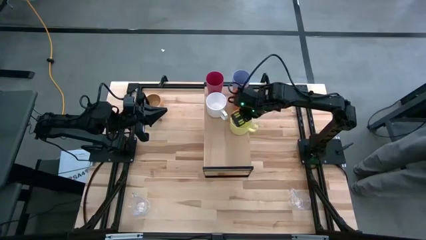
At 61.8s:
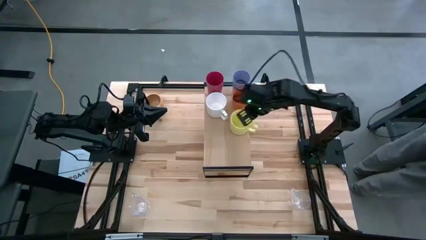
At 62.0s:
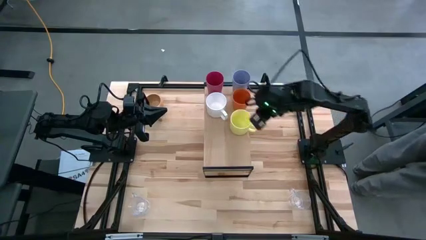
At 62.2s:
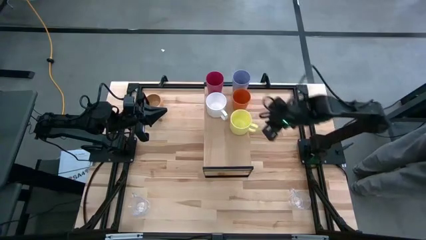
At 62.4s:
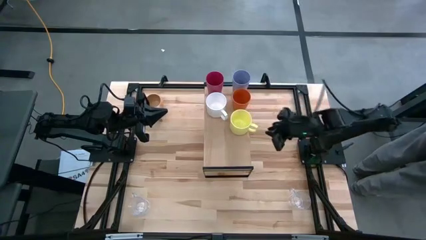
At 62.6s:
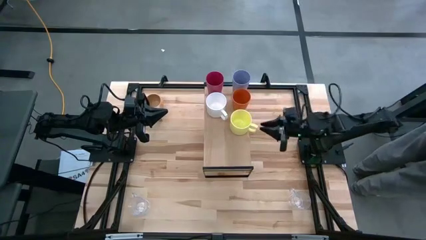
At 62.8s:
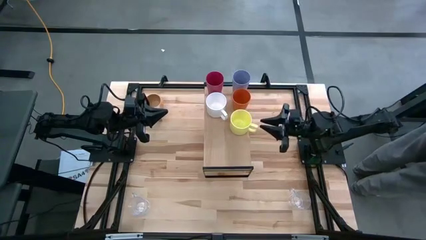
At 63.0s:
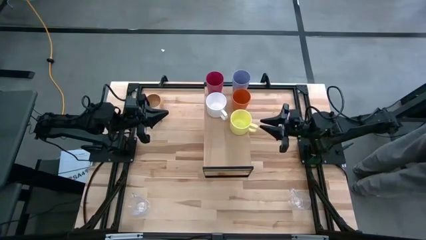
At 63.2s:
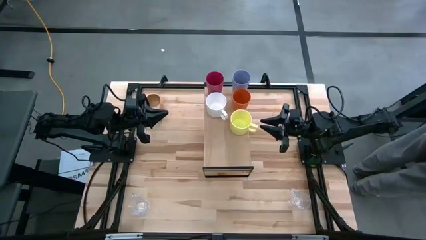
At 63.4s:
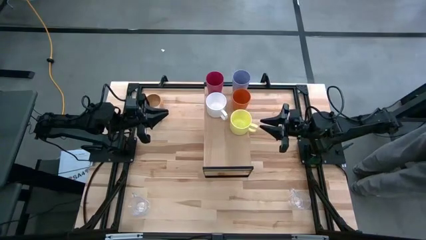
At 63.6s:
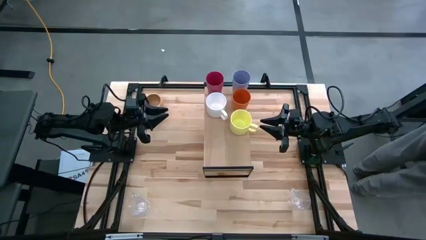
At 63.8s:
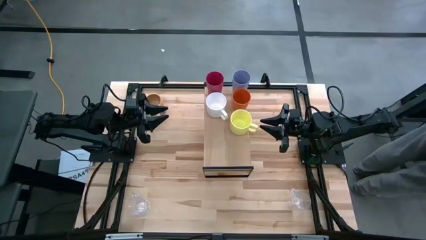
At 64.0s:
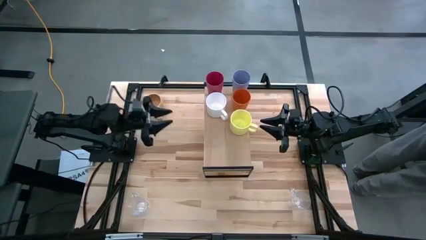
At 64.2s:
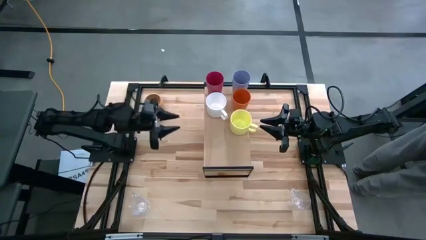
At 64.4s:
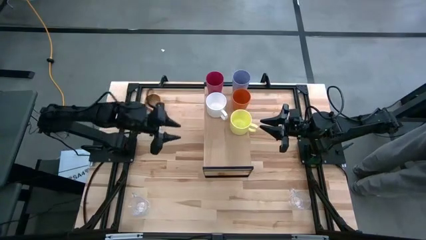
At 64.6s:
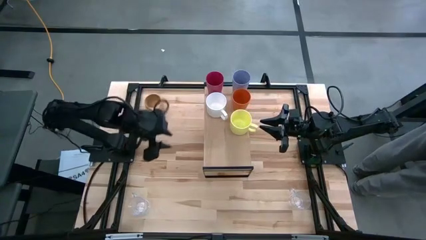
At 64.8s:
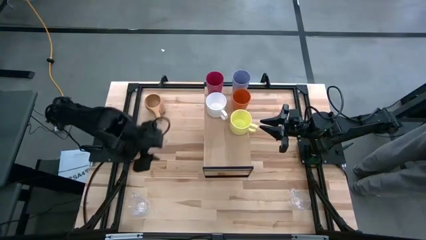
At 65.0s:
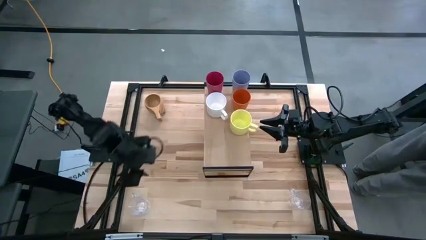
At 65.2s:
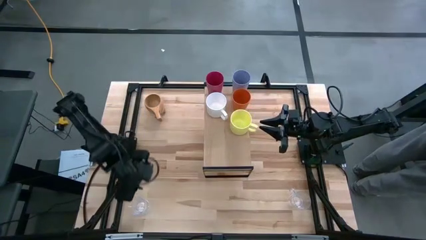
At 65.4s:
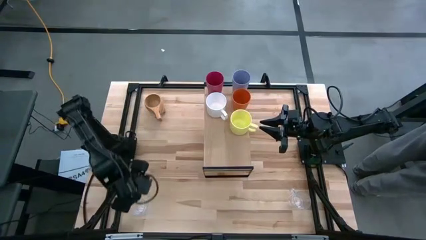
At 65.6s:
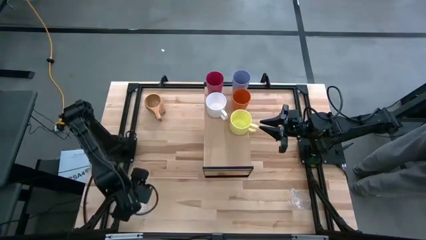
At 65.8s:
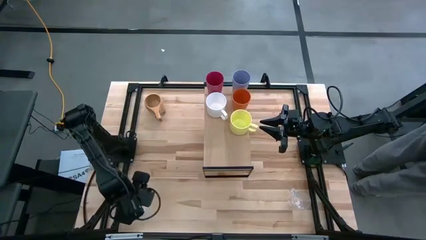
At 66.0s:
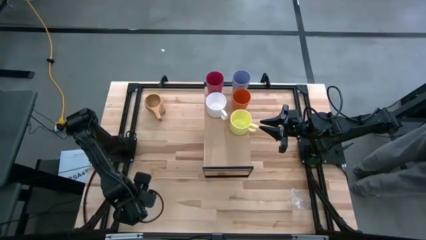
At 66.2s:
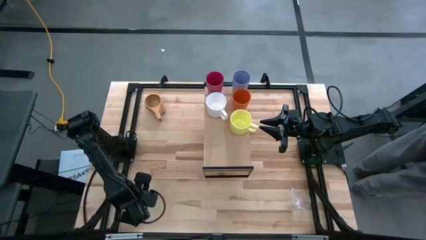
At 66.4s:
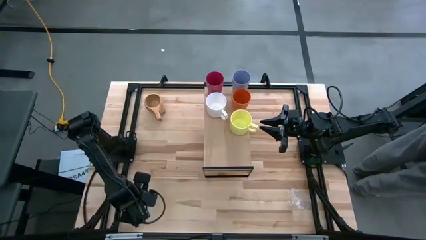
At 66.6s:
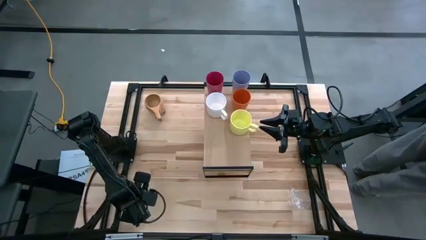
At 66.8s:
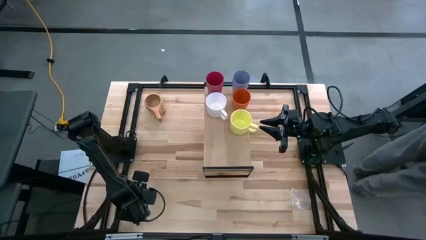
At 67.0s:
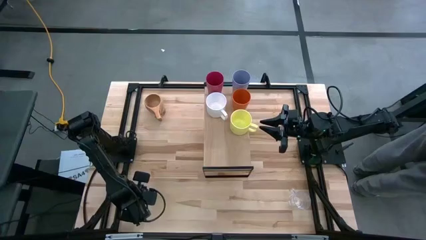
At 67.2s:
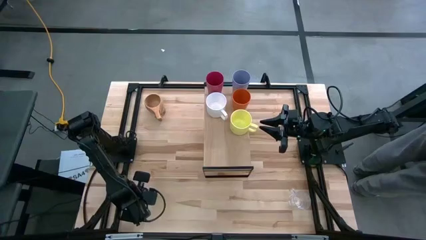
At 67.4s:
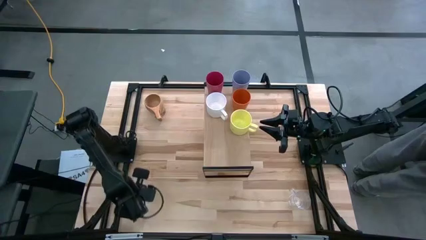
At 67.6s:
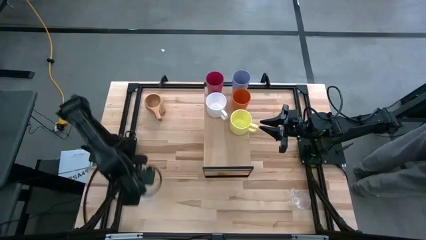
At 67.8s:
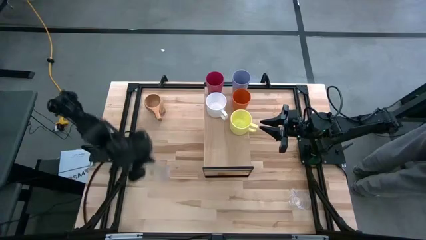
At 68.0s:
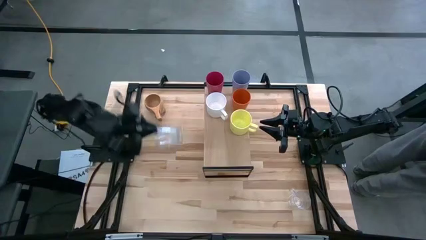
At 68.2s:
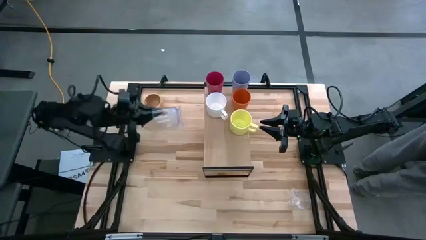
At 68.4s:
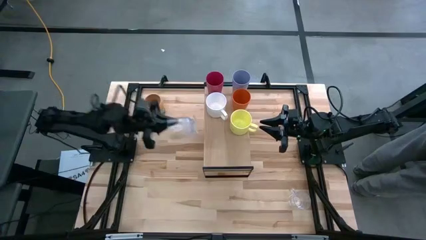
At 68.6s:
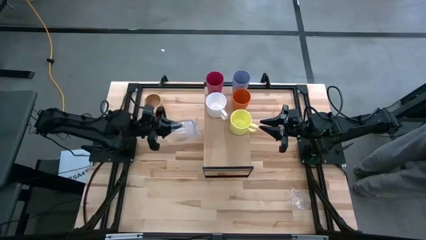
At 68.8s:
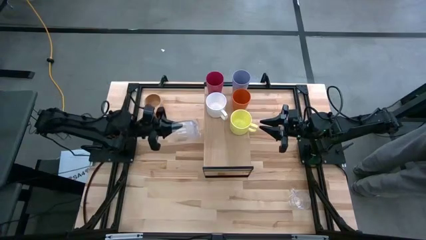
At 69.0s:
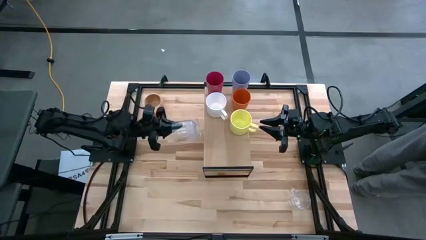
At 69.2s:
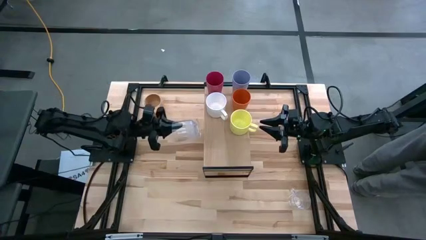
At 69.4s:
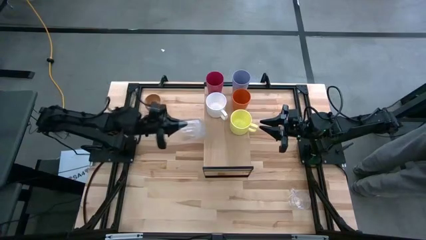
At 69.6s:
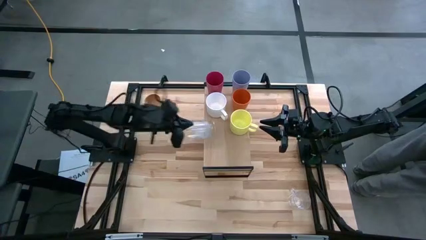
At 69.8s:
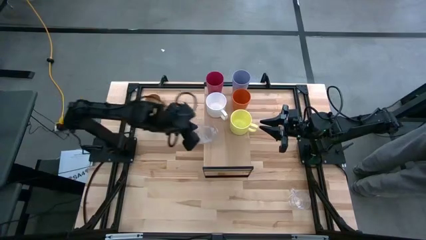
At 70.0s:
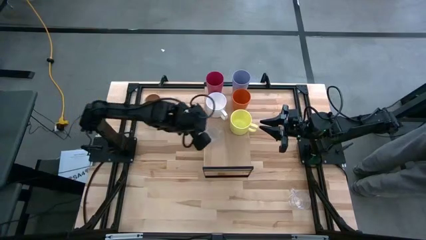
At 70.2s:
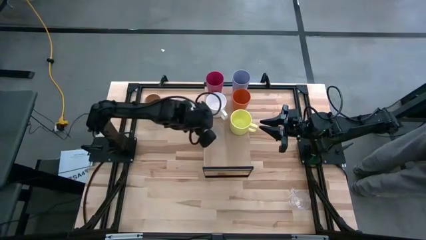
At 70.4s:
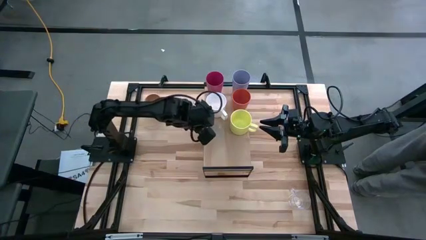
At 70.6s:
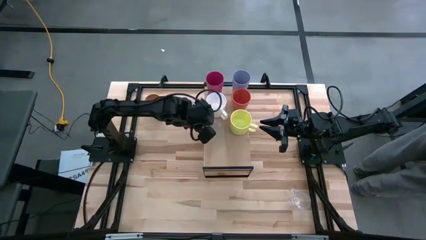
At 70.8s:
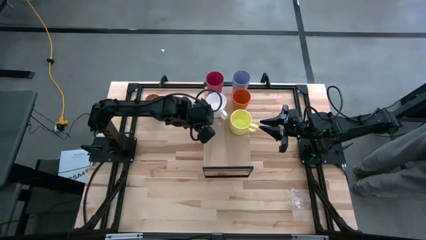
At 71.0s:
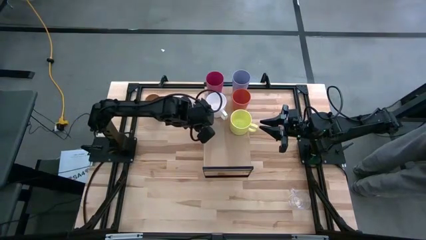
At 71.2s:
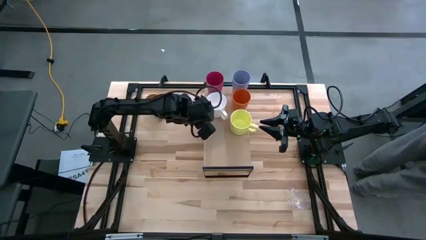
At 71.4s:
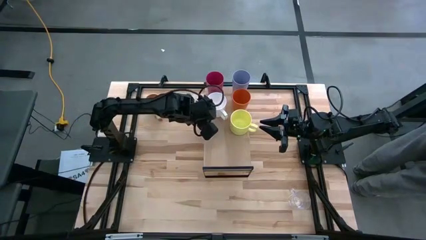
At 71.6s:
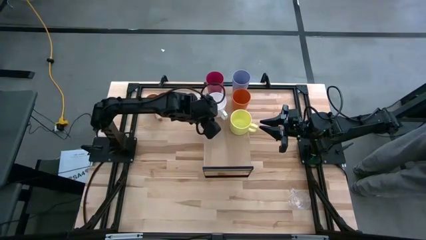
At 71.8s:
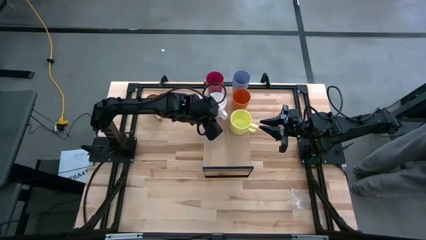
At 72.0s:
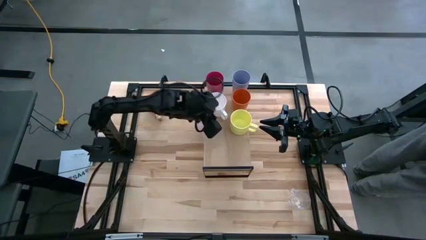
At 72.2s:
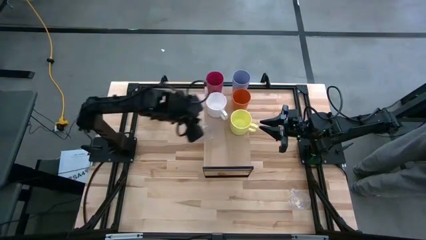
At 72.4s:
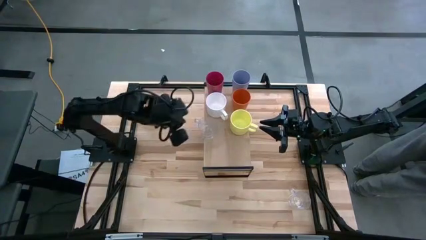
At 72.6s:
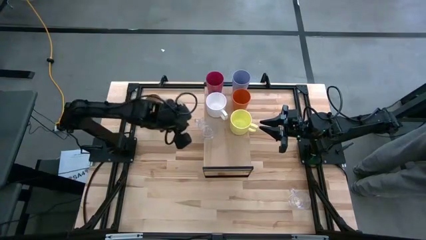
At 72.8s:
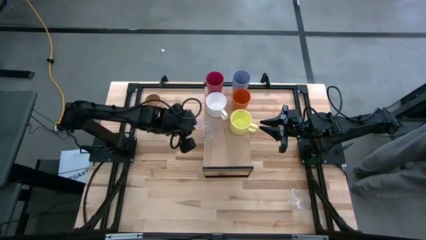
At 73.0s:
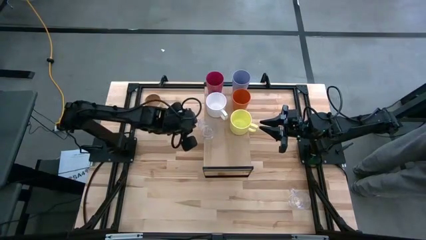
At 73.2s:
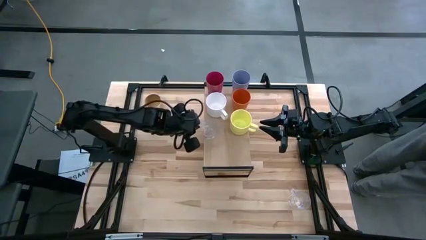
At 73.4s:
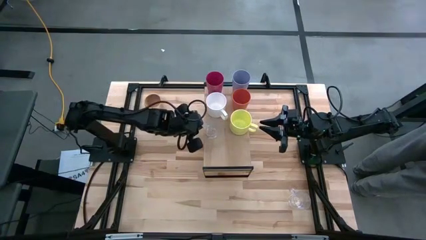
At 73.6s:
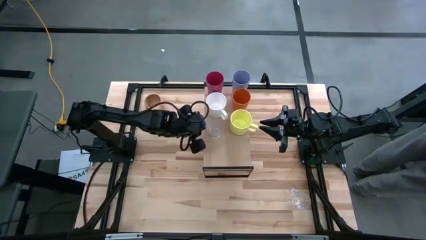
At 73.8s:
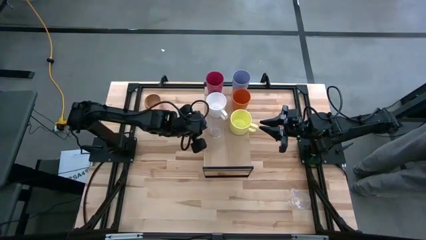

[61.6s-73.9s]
Task: Stack small to large cups/mugs on shelf
Put the left transparent cup on the shelf

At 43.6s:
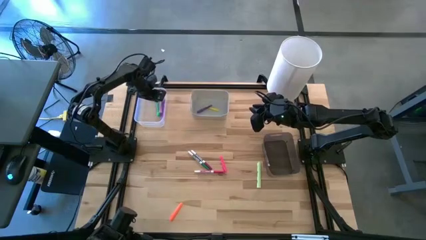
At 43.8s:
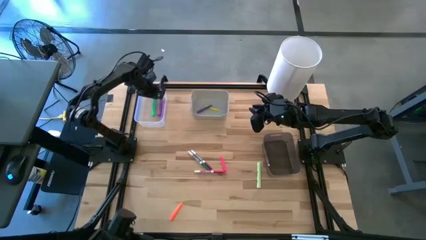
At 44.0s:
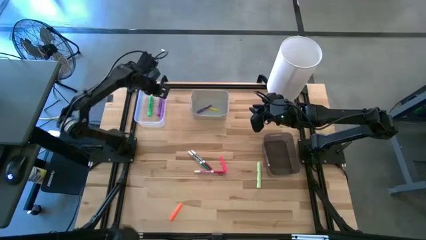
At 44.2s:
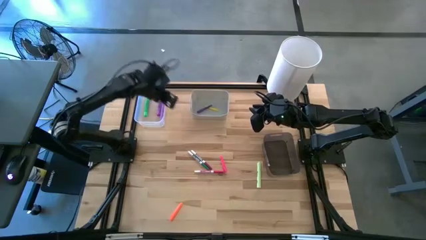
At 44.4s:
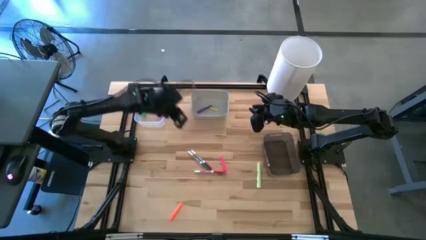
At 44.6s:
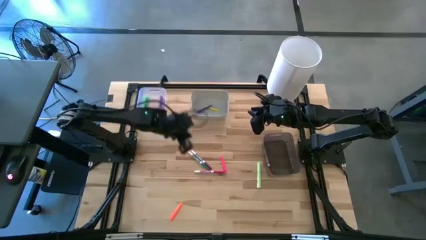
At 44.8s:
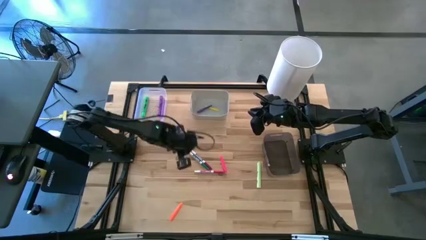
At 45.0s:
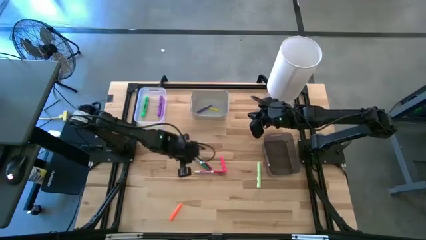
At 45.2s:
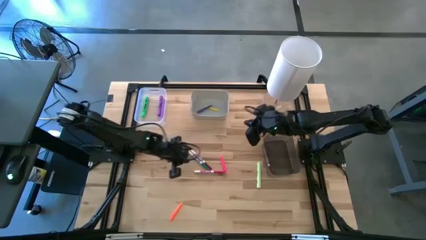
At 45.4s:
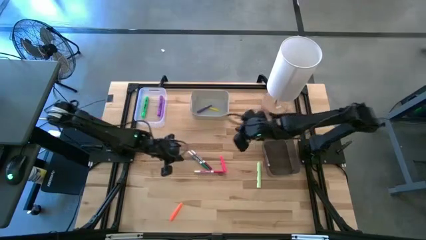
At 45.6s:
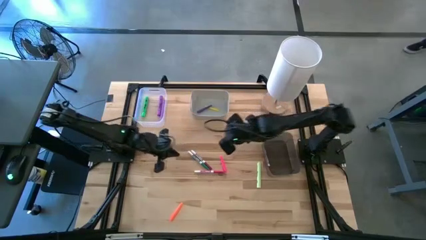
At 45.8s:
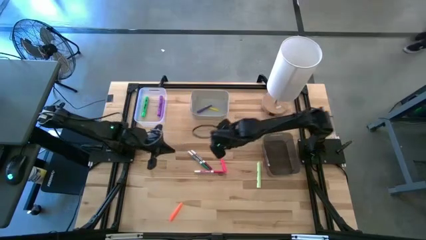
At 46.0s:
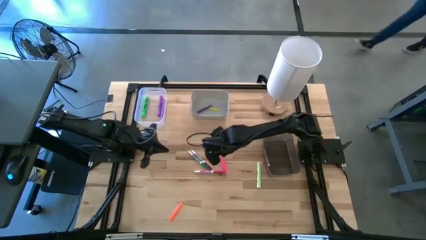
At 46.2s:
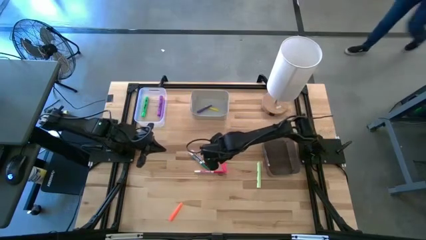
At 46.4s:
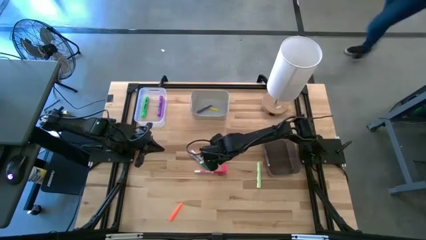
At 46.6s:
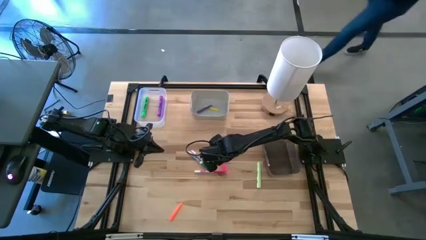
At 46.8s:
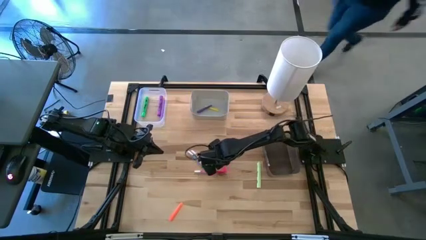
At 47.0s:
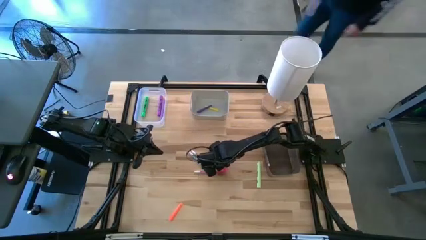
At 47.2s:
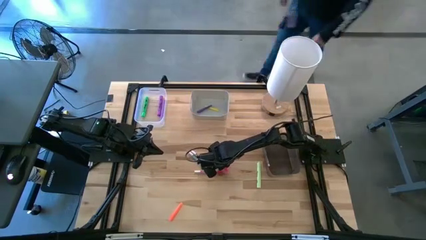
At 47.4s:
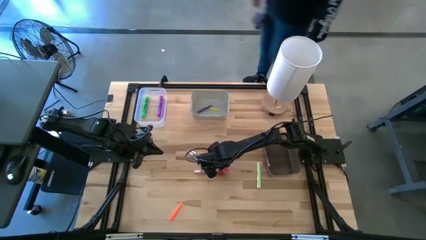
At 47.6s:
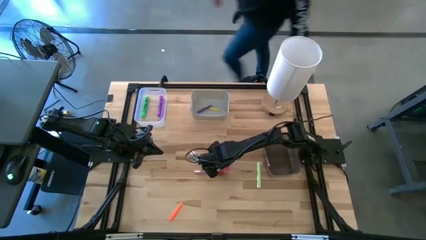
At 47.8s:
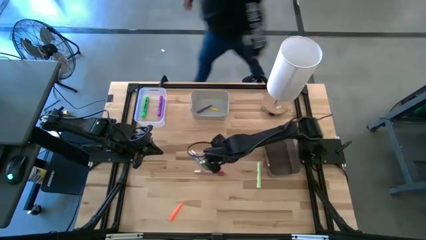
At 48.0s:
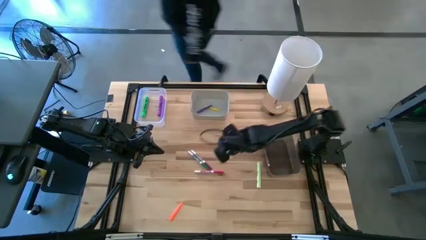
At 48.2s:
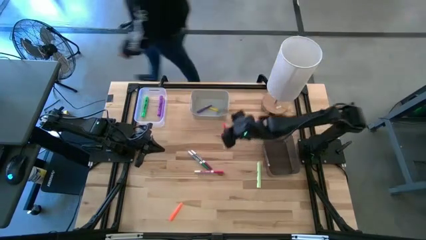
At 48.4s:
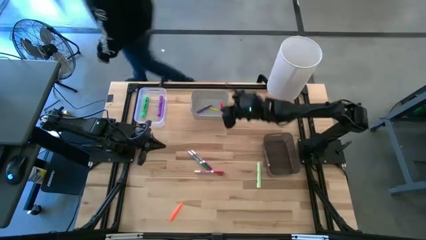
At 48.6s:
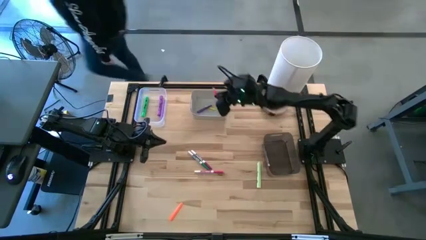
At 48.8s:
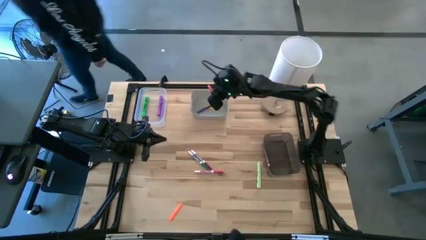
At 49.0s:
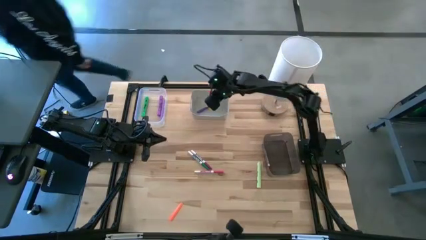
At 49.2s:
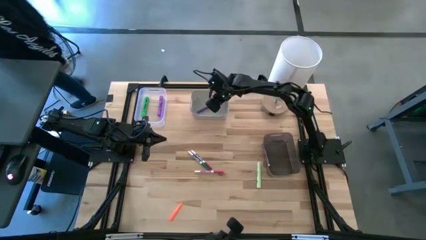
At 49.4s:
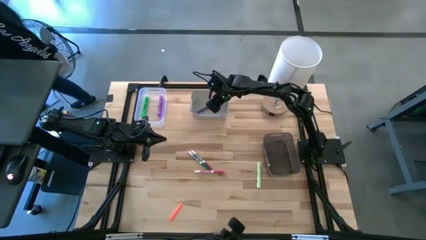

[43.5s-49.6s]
Task: Pick & Place Markers
Put the pink pen into the gray bin
